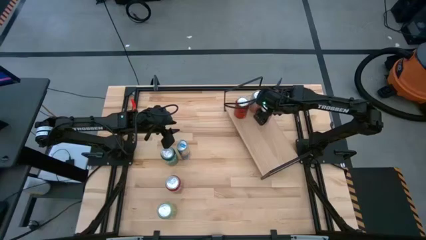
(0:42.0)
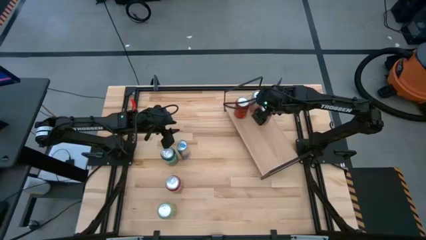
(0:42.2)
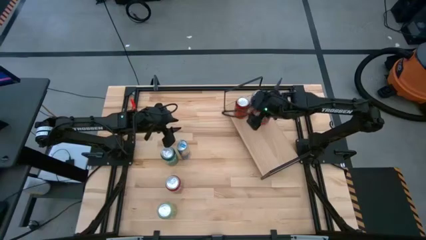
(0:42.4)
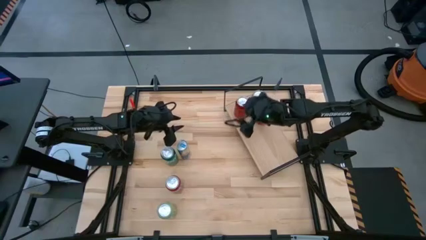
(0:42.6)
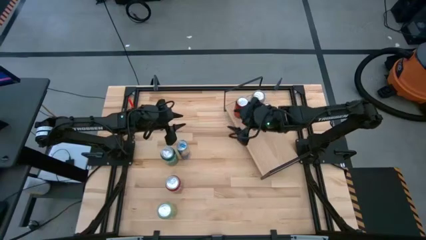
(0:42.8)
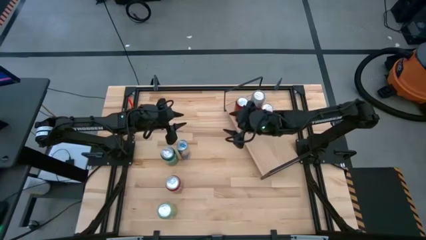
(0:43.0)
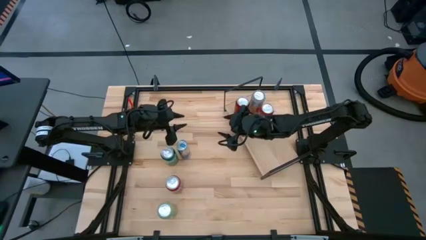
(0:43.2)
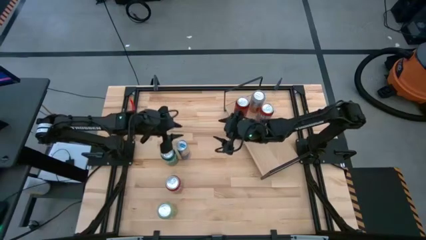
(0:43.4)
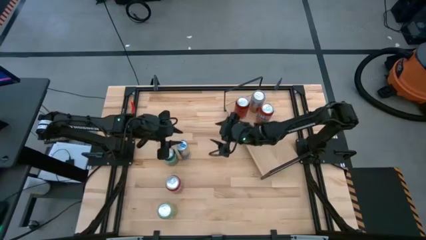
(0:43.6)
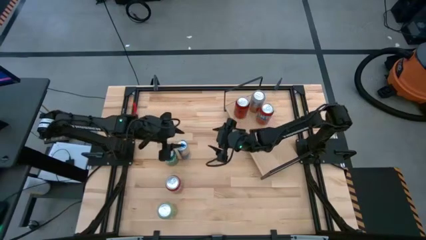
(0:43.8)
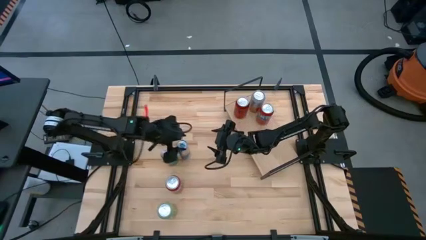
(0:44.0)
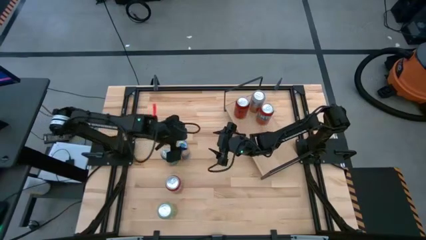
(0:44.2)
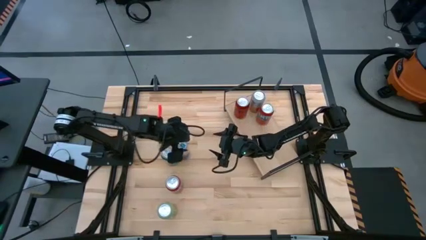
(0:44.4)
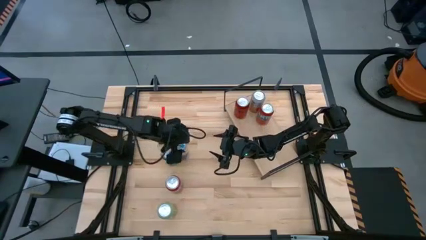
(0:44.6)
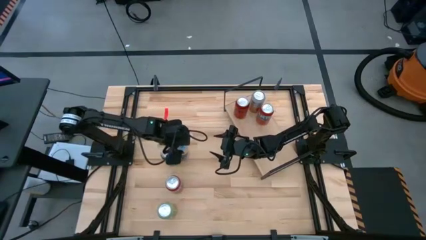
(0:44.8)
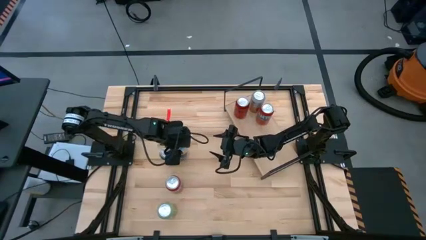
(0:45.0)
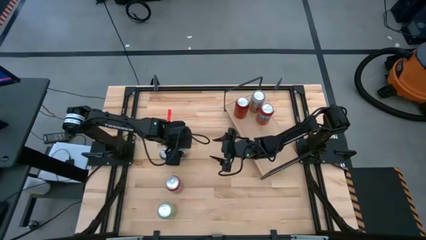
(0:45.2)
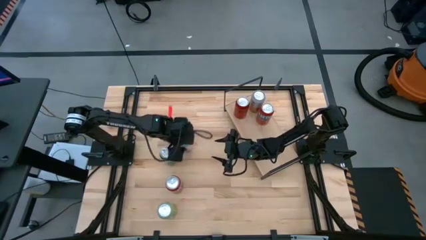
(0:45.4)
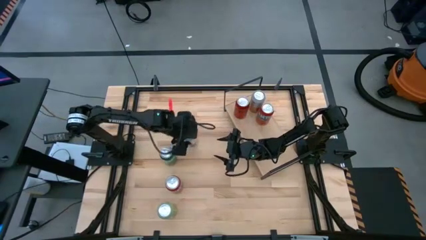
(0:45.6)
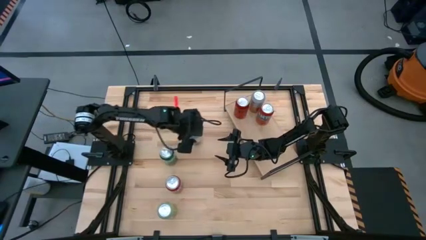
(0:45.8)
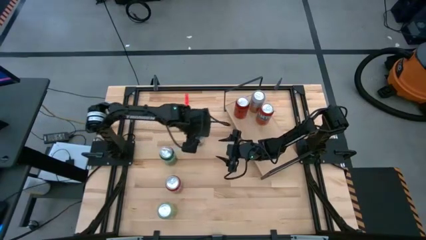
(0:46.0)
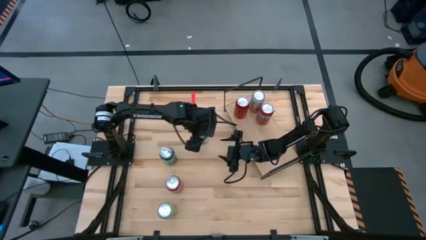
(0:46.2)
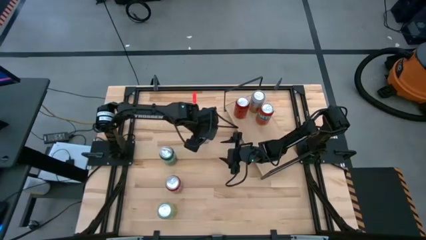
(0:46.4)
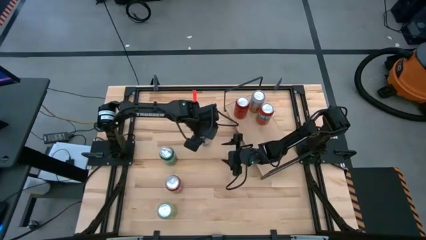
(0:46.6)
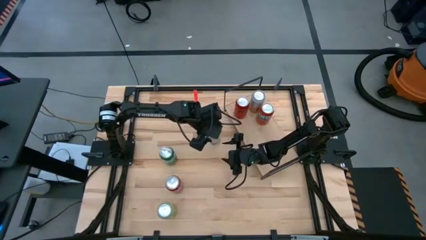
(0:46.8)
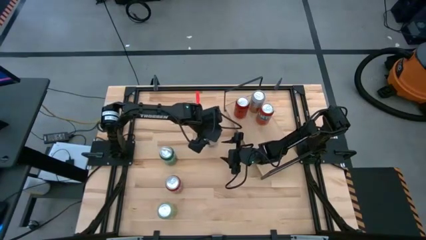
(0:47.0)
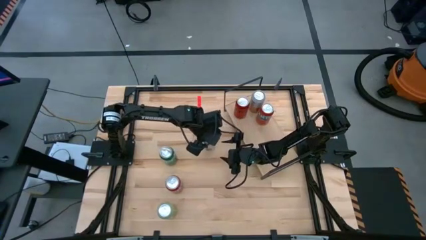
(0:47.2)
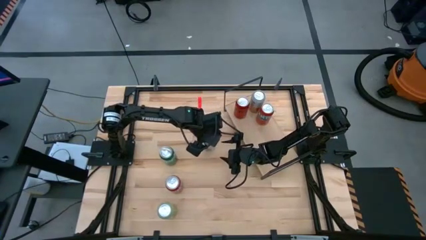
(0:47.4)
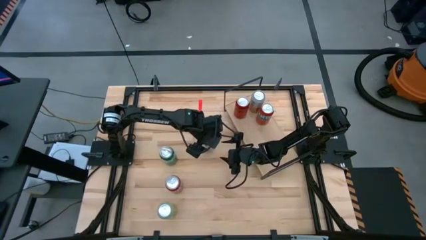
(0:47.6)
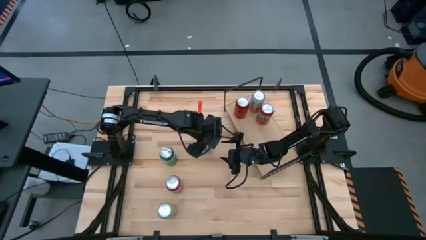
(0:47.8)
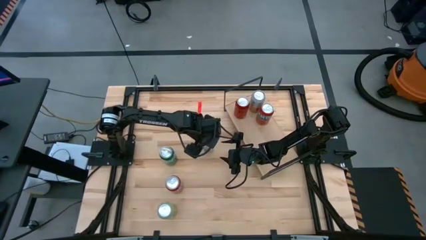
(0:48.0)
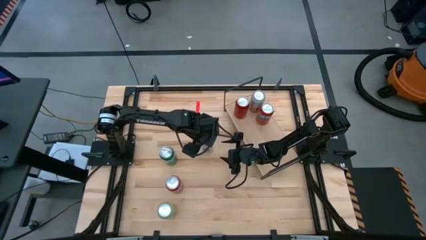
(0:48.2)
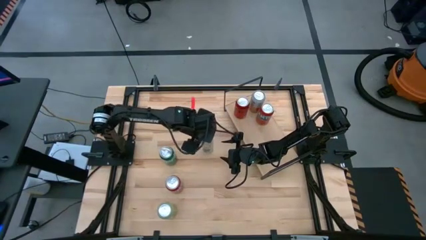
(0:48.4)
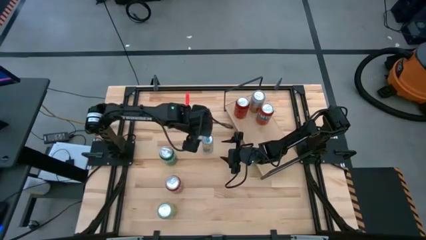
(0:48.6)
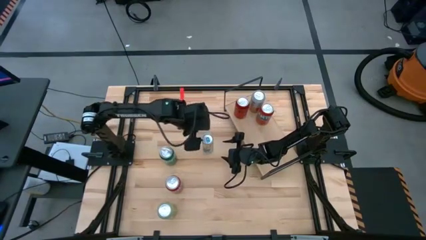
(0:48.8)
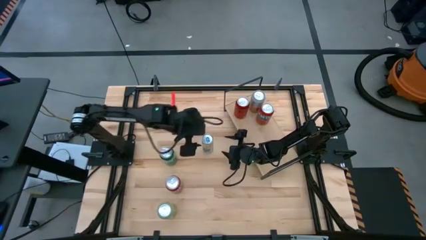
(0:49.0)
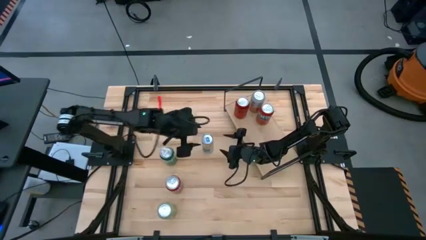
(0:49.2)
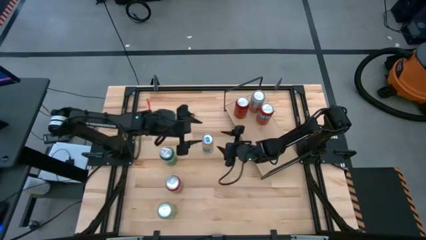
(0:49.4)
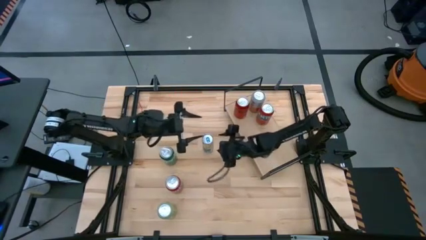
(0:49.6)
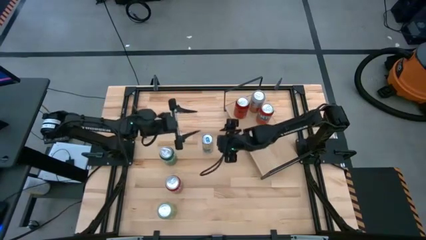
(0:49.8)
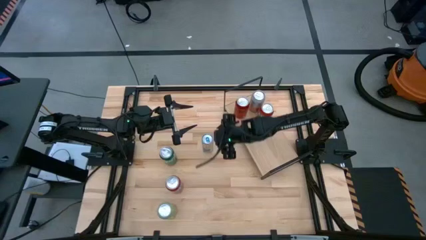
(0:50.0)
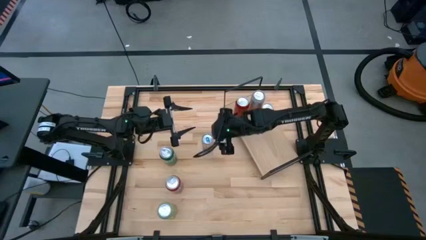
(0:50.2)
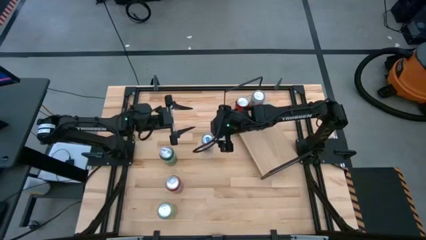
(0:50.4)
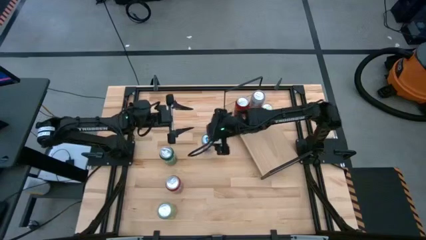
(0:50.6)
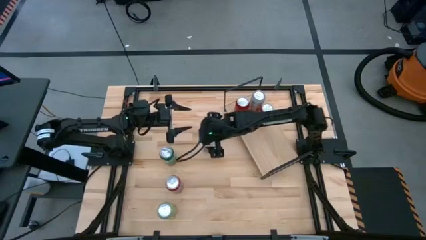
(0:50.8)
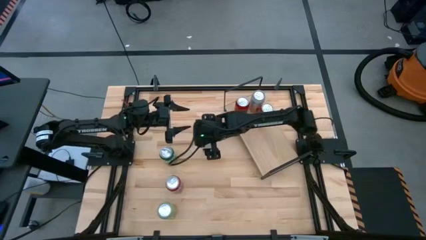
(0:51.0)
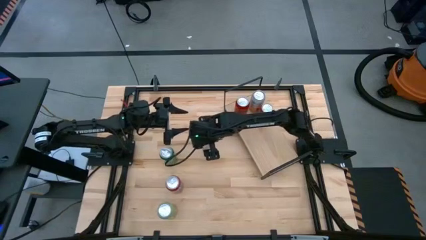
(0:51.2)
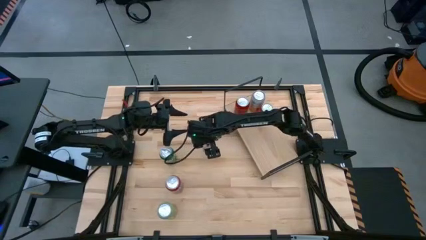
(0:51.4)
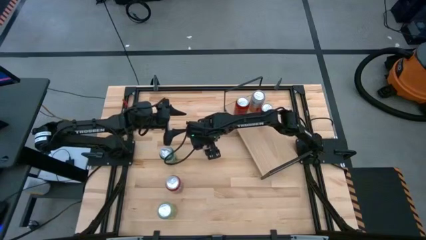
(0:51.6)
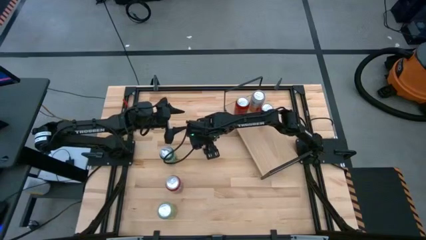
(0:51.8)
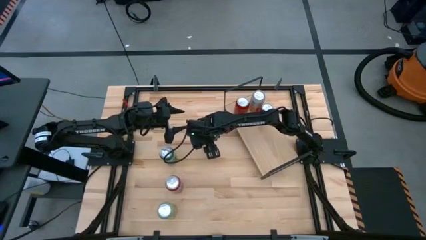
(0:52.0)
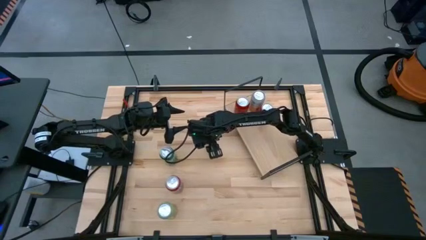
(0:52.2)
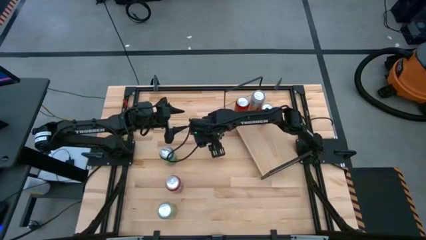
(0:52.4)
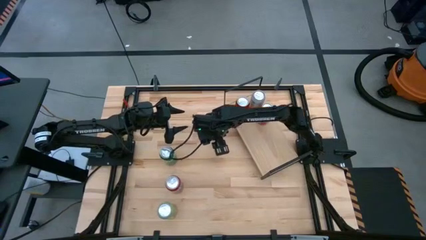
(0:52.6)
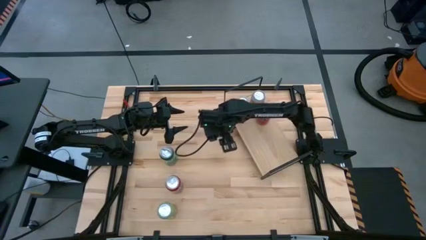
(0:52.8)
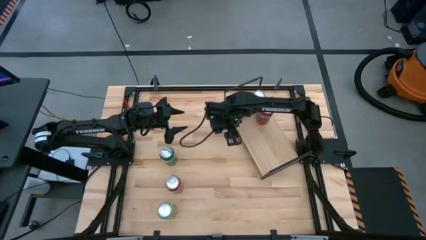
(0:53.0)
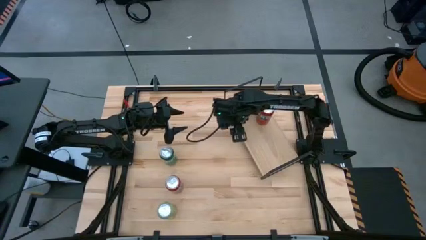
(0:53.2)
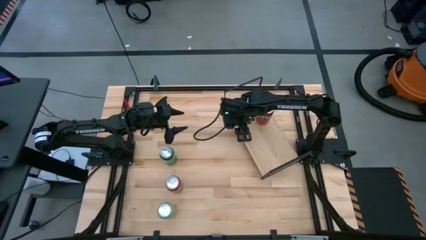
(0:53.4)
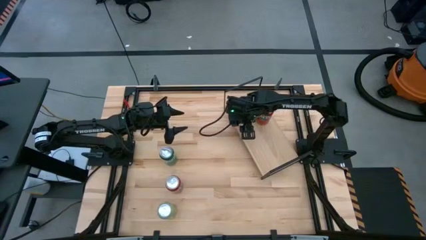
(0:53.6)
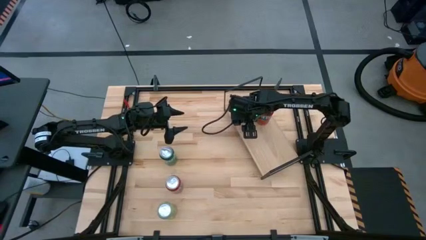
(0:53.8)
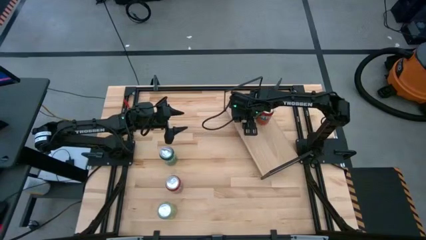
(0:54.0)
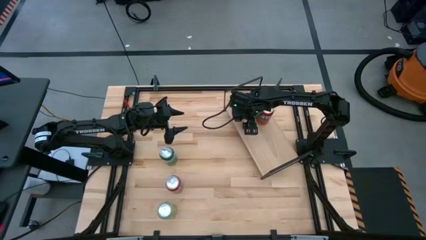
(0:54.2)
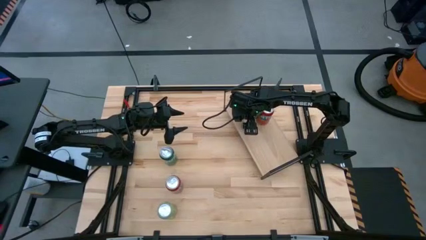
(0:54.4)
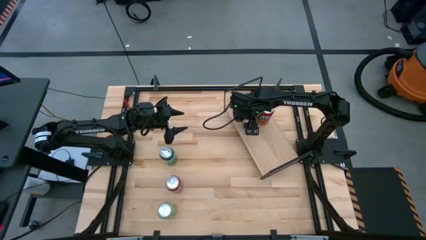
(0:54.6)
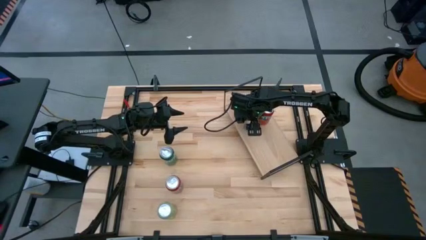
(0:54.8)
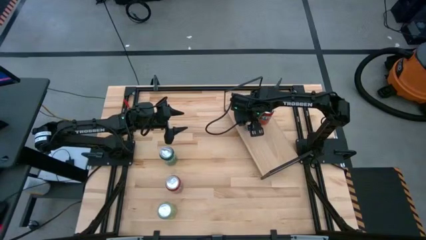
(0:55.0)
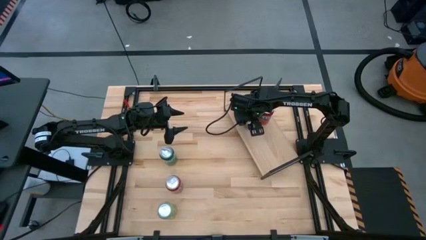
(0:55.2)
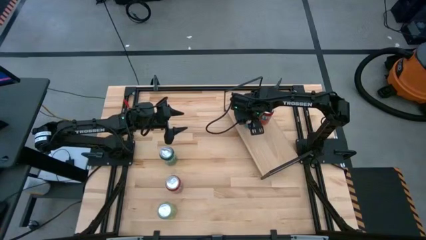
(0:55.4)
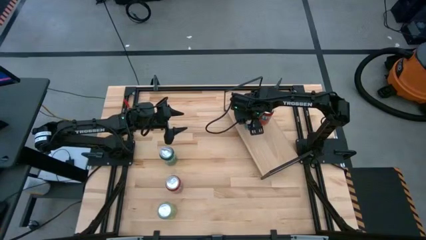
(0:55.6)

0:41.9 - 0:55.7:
Task: Place canned beverage on shelf
Put the blue soda can on the shelf, aligned with the other orange soda can
